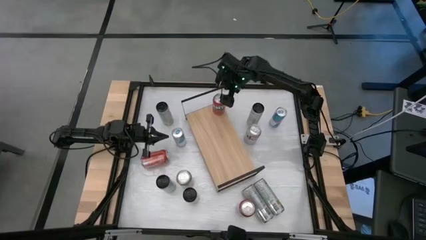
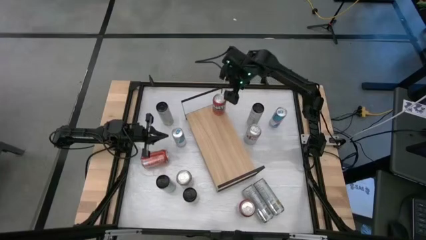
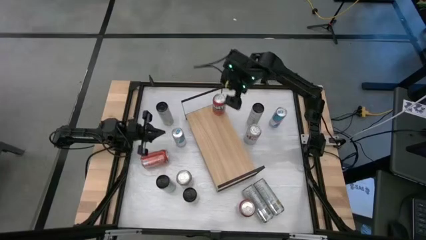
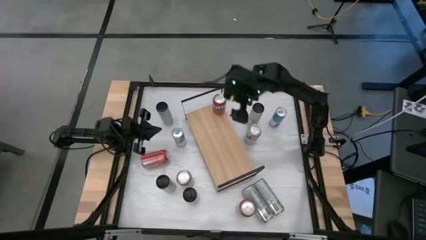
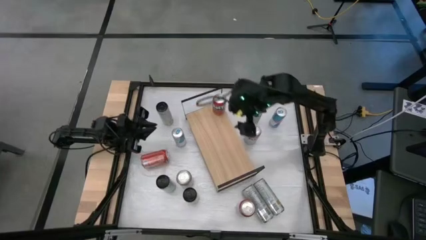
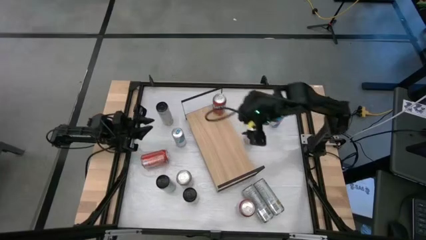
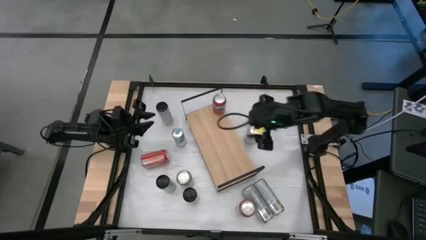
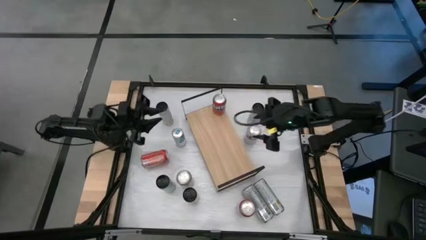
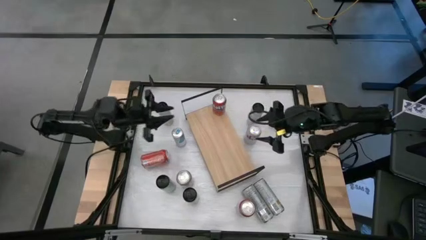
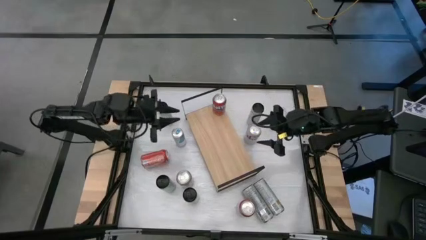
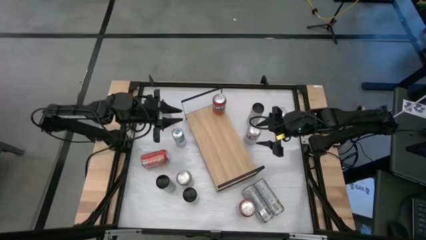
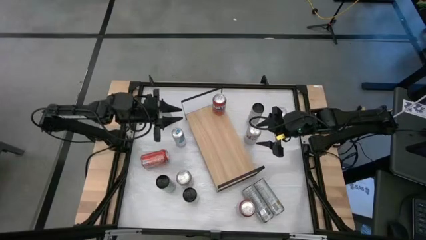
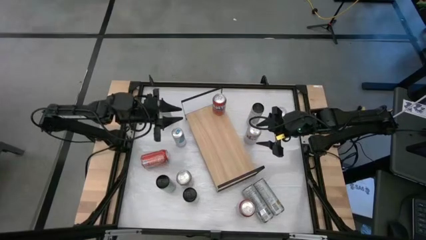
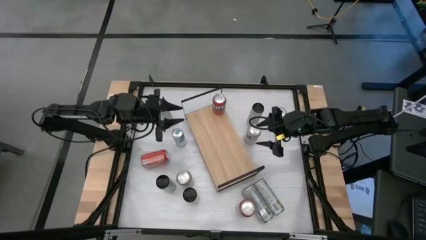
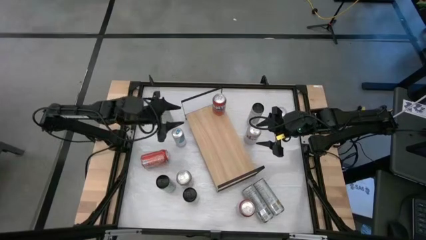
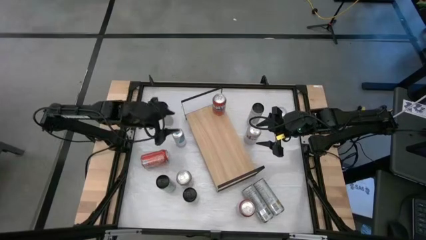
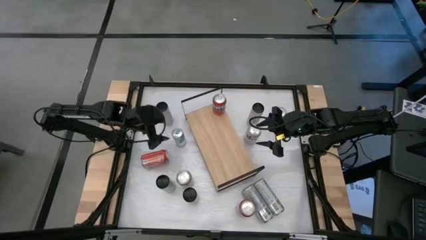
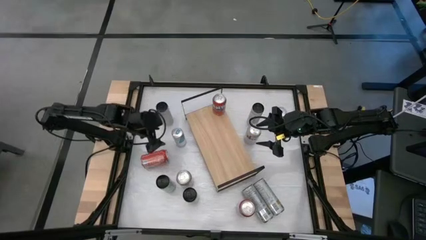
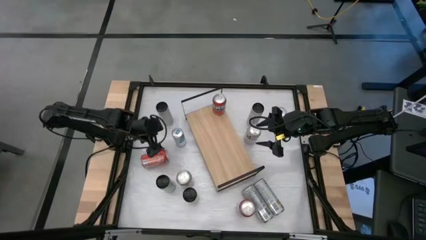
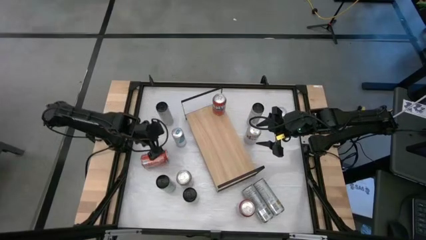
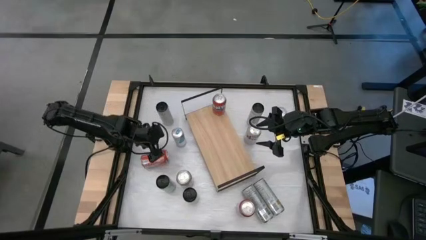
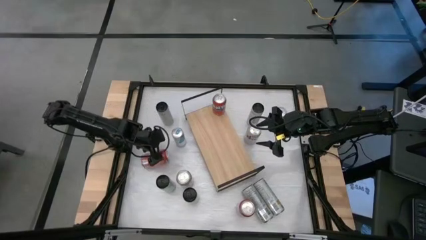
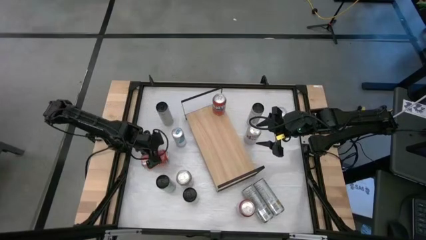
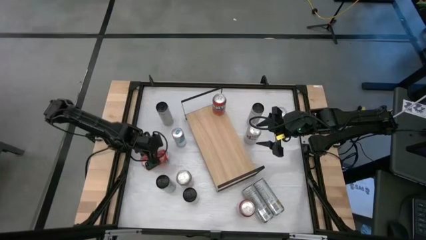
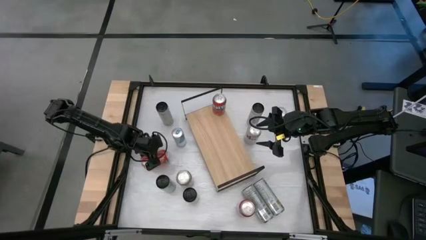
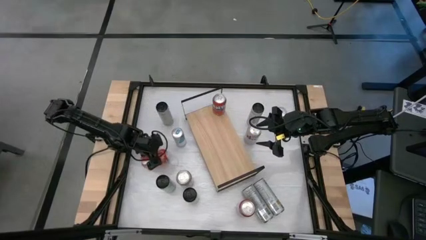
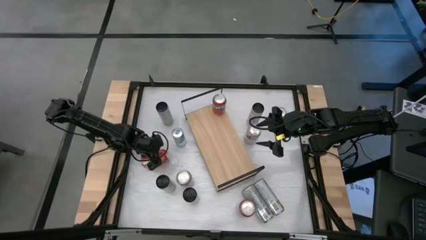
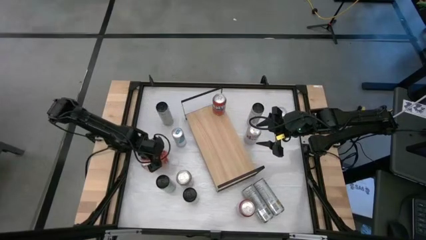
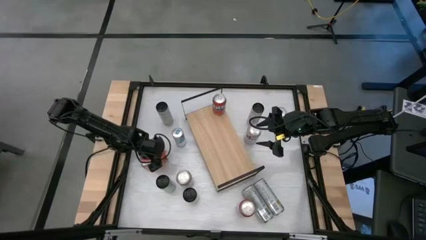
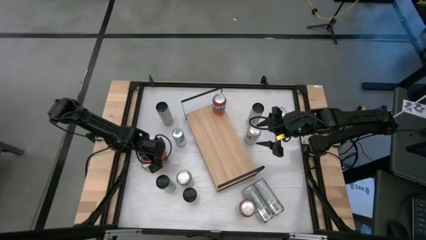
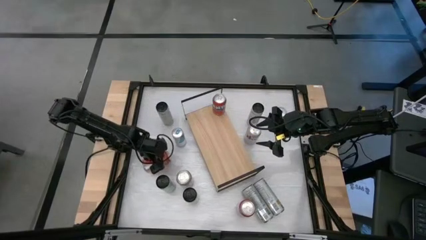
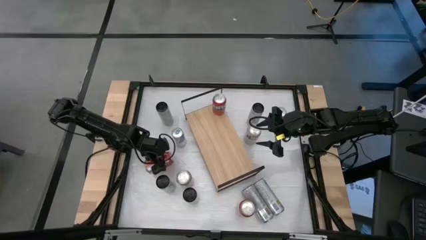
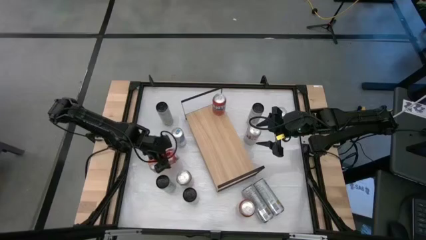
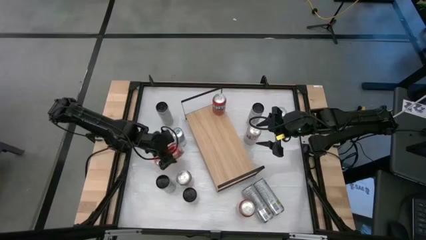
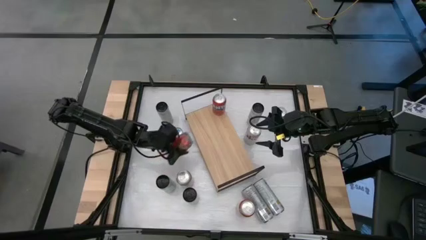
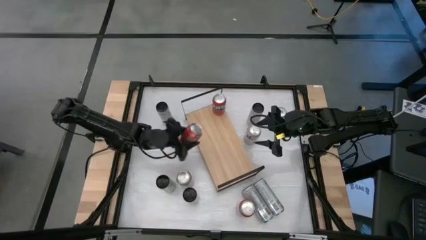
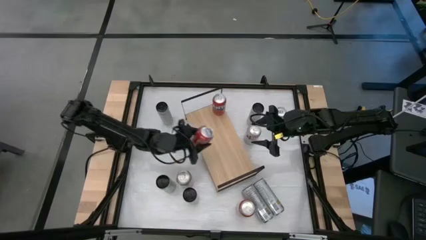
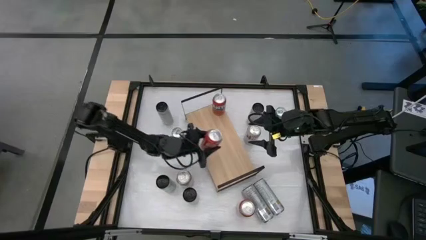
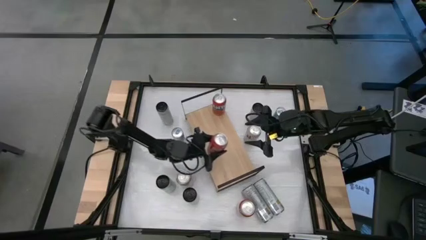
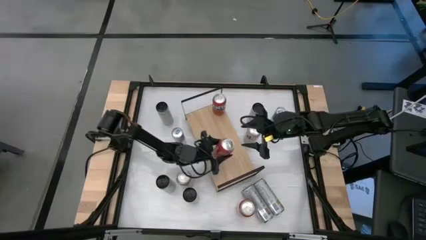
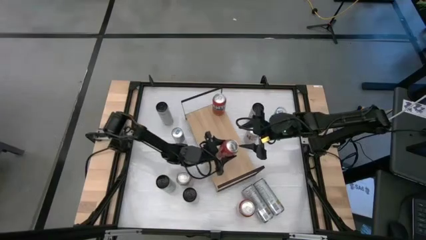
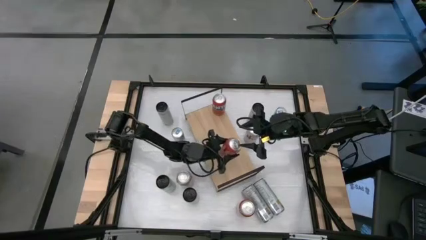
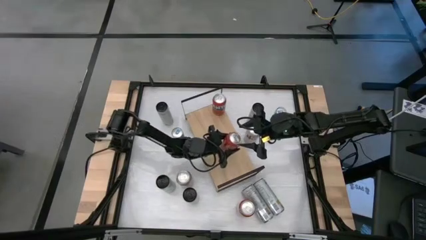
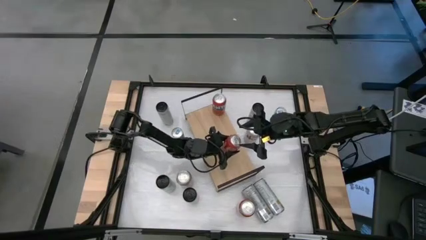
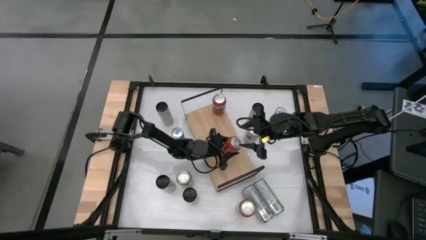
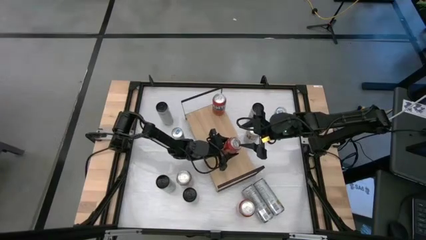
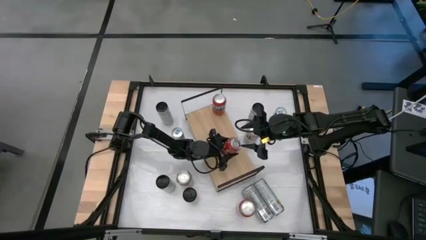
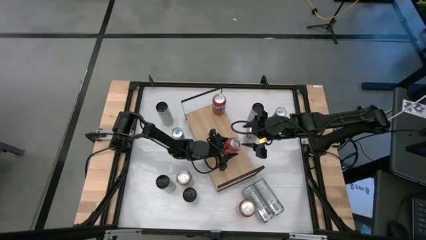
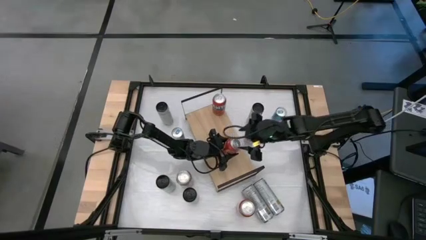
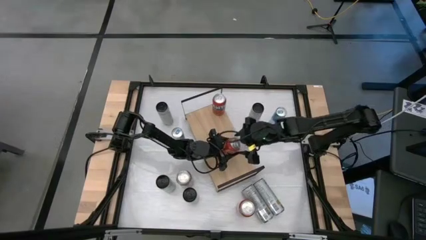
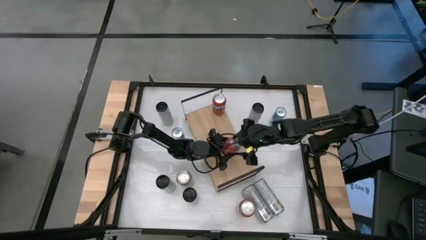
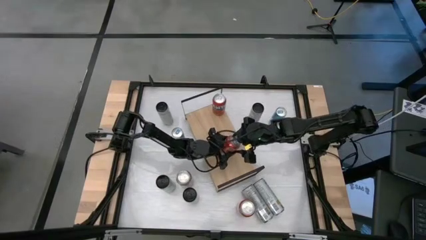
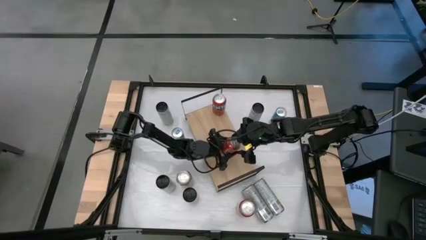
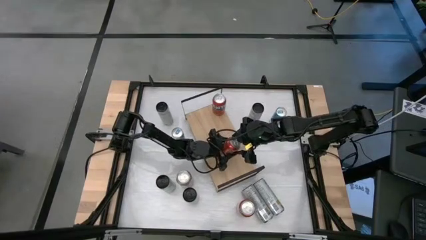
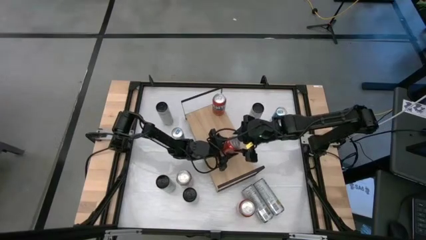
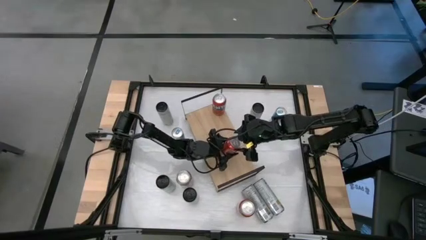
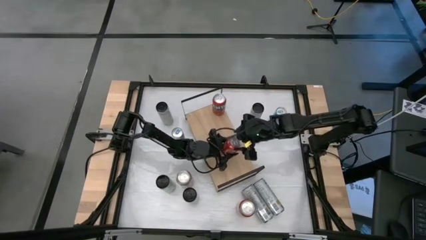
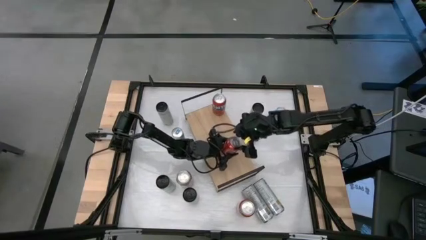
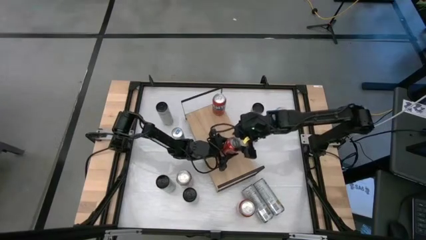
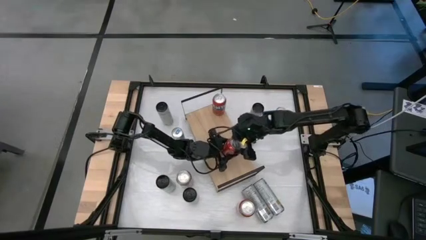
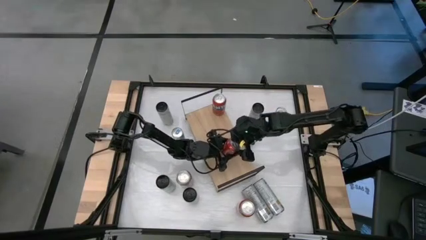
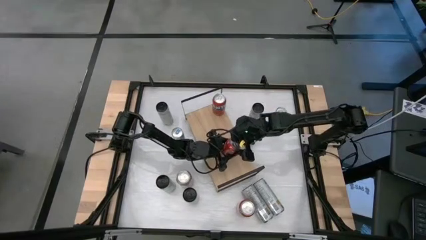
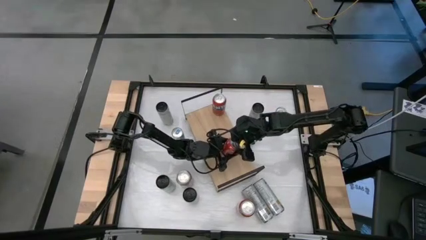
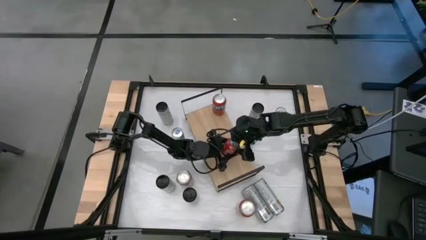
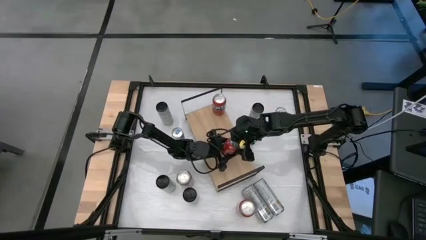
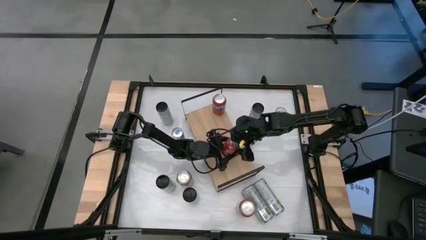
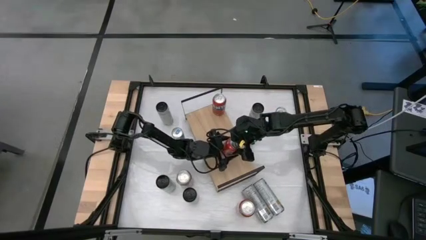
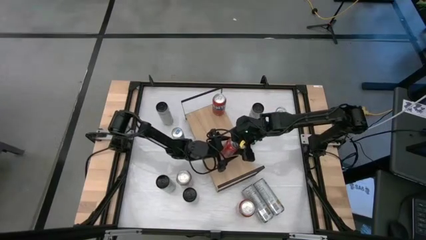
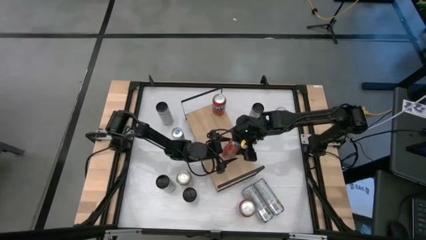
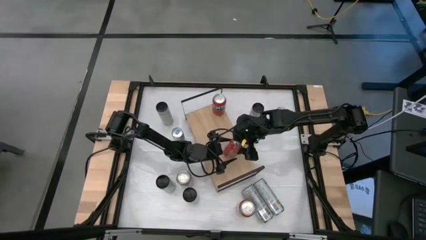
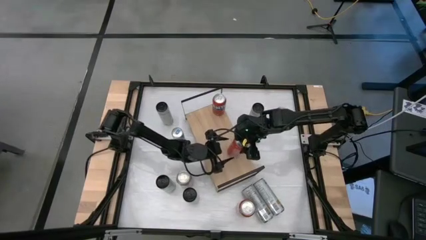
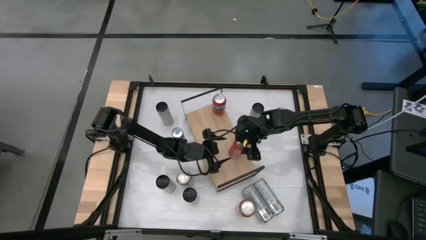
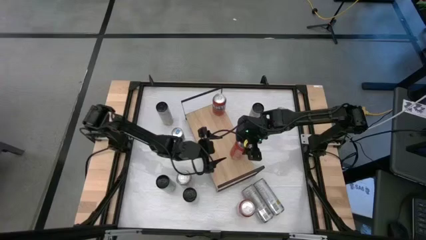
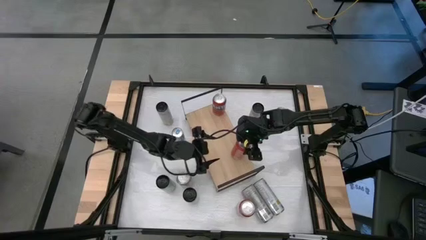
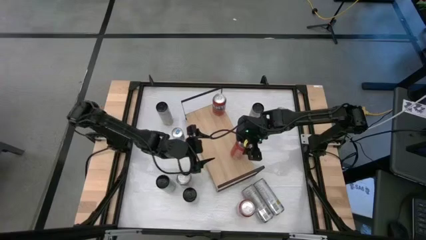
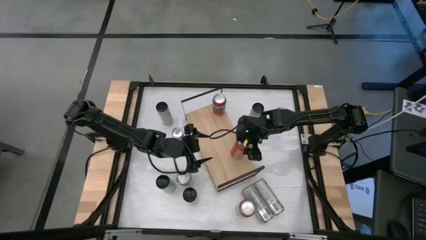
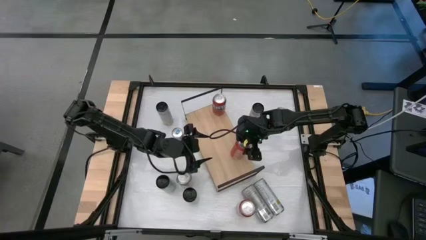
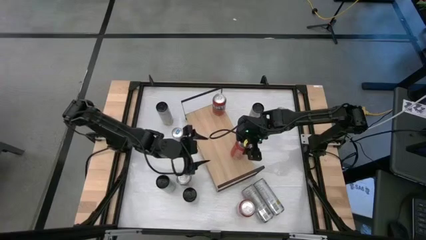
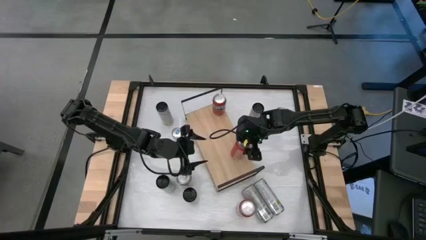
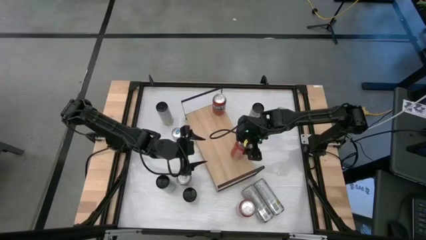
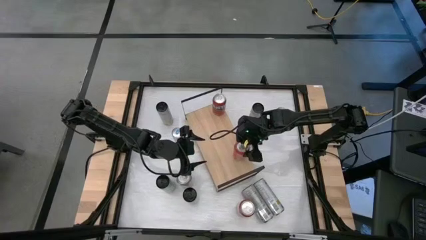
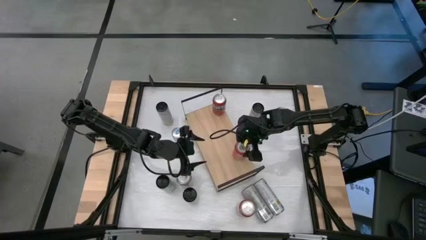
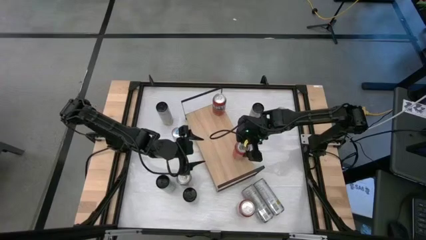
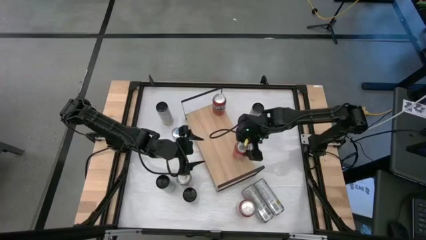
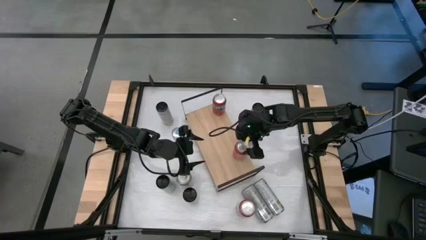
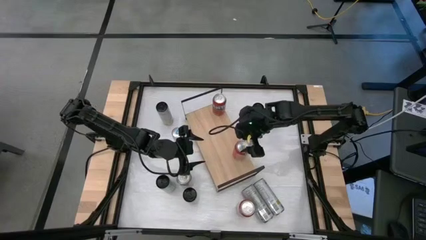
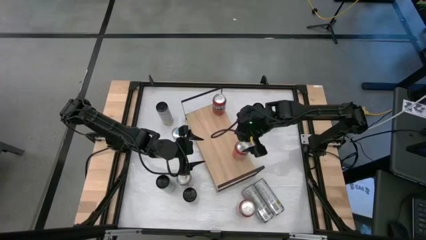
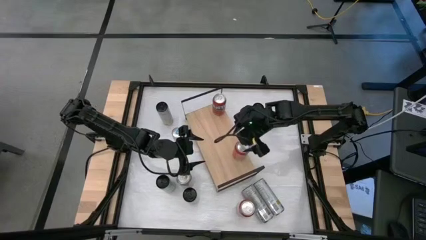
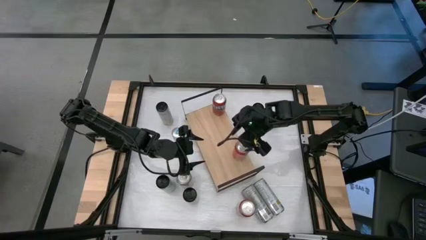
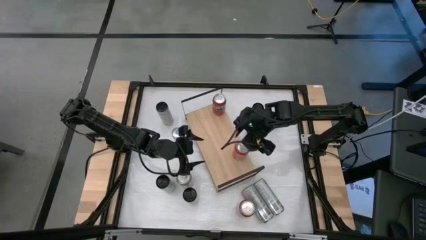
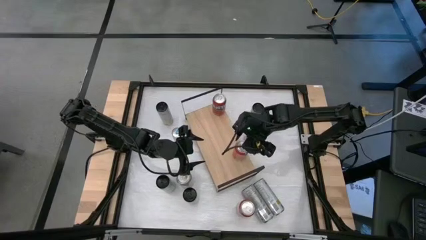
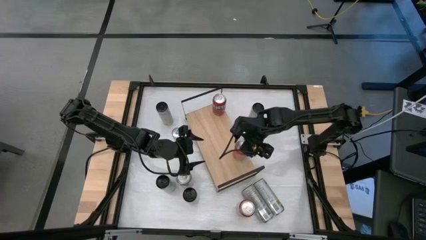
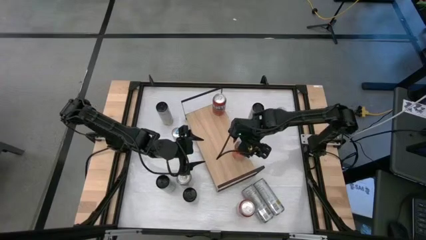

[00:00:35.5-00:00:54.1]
Task: Place canned beverage on shelf
Align the left orange soda can with the other orange soda can
